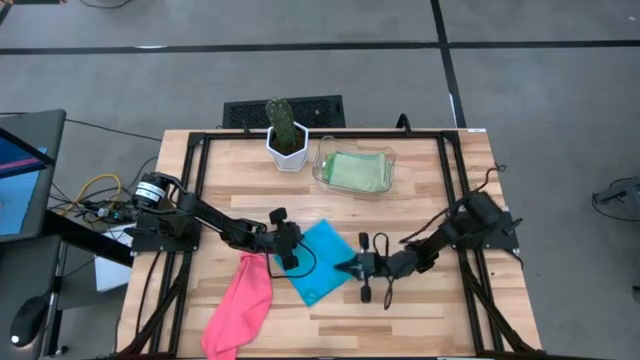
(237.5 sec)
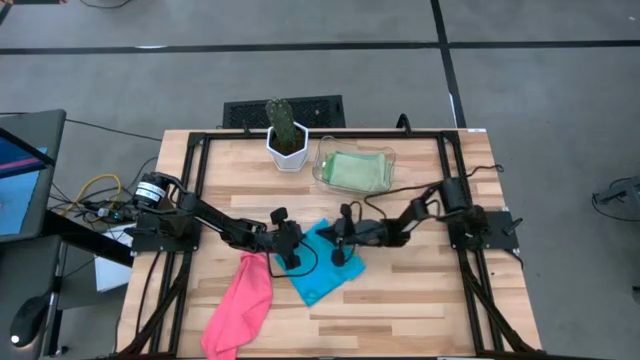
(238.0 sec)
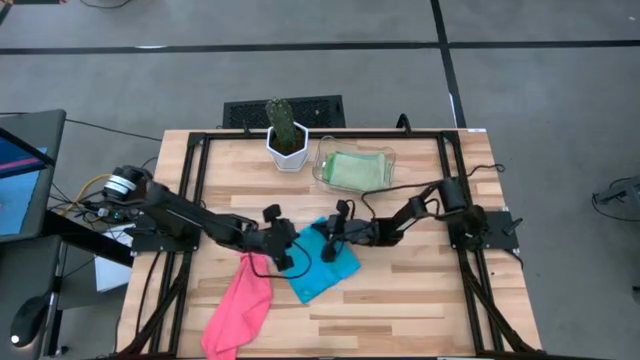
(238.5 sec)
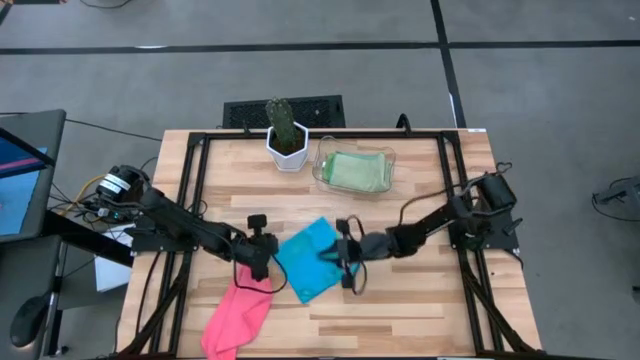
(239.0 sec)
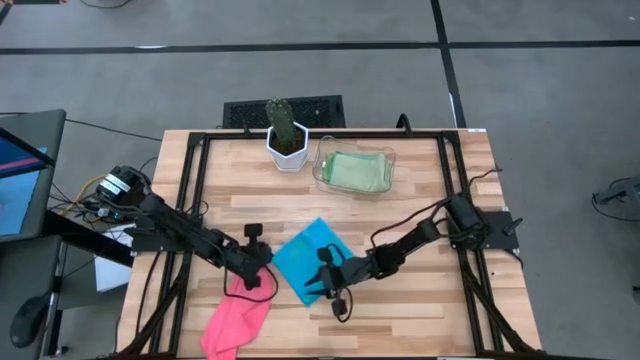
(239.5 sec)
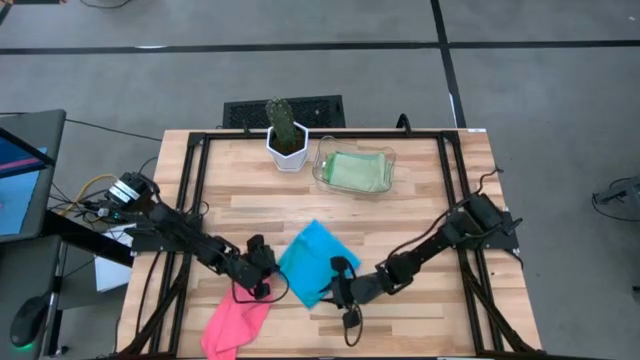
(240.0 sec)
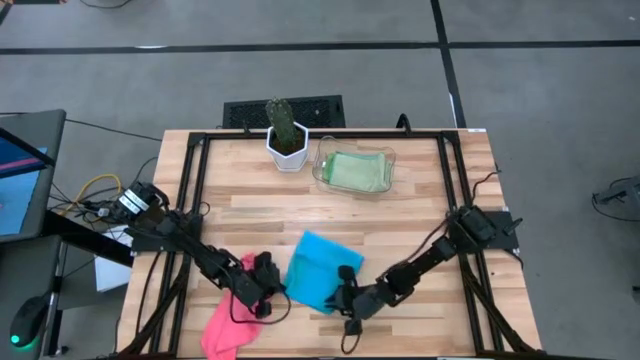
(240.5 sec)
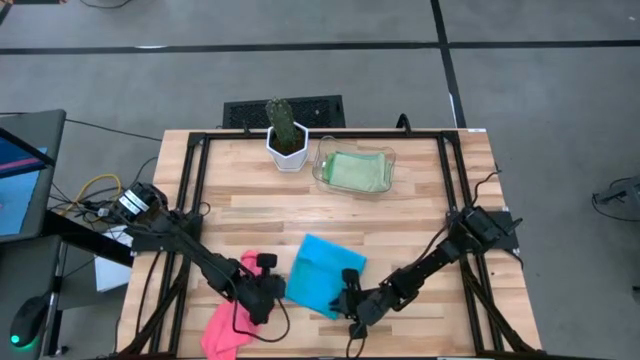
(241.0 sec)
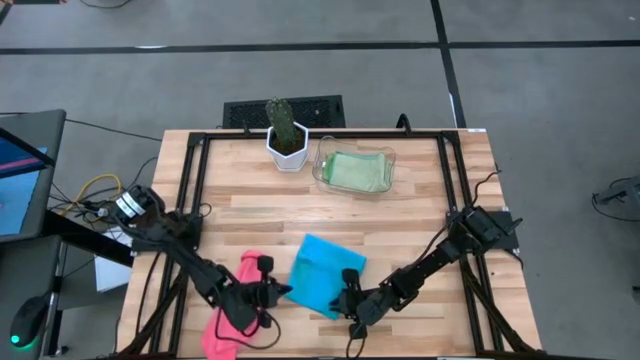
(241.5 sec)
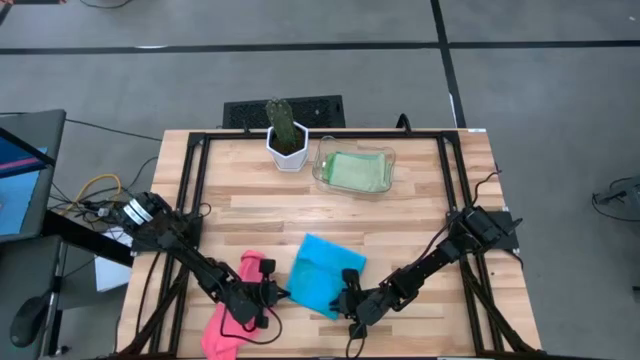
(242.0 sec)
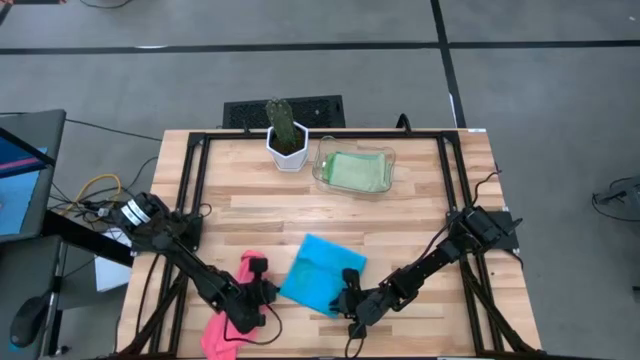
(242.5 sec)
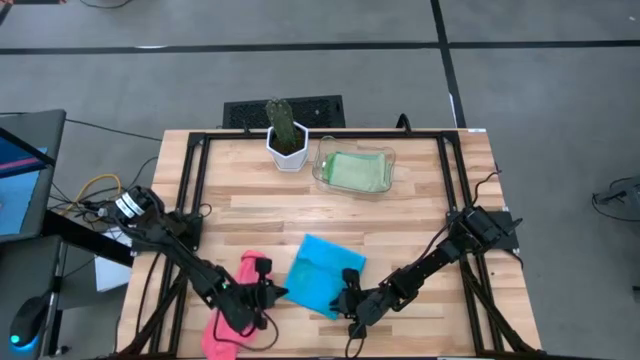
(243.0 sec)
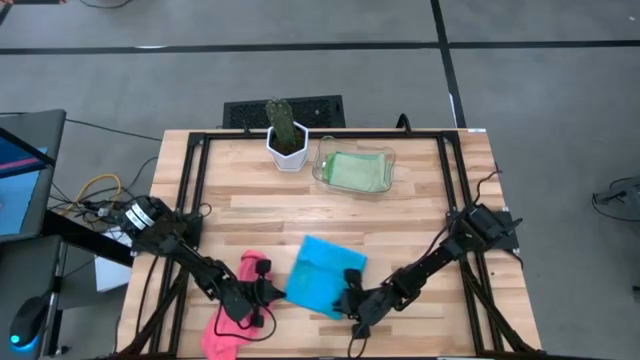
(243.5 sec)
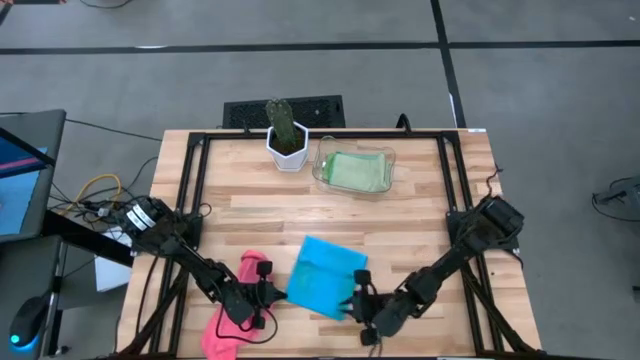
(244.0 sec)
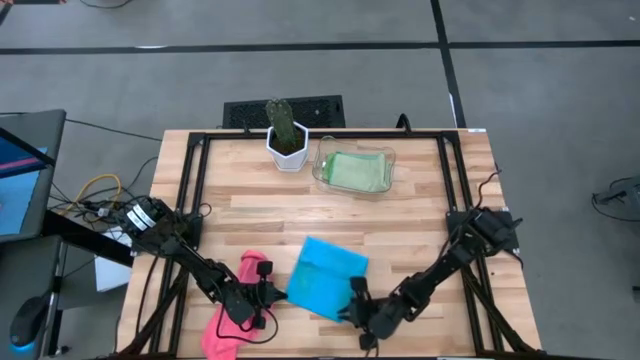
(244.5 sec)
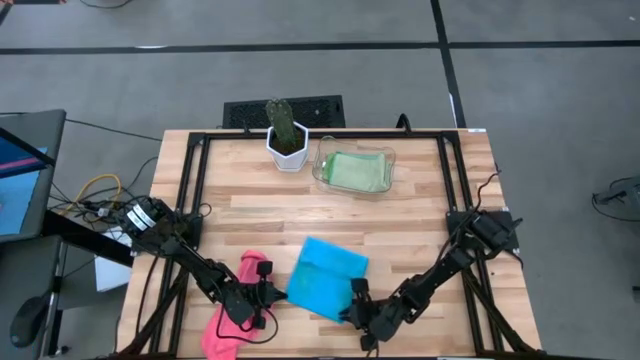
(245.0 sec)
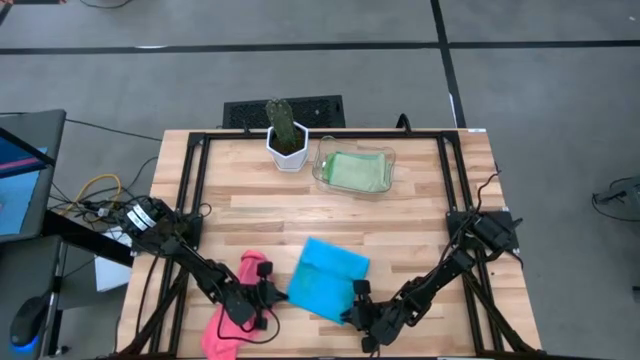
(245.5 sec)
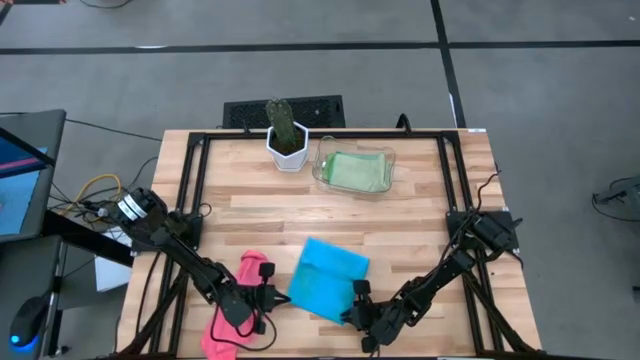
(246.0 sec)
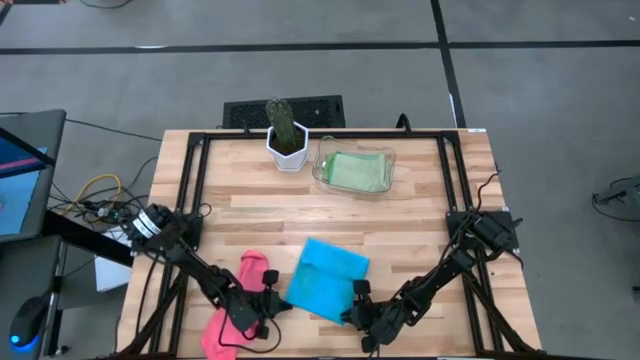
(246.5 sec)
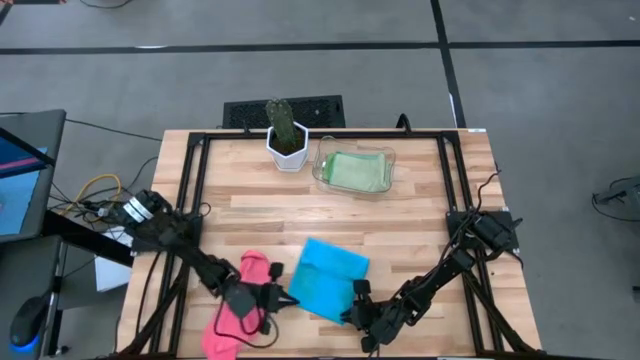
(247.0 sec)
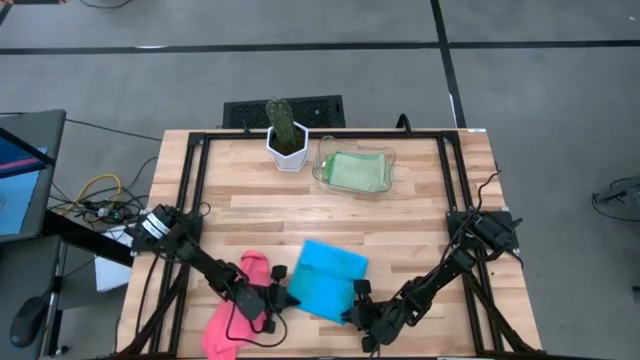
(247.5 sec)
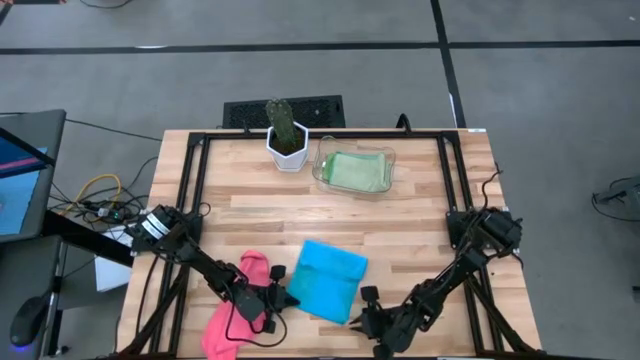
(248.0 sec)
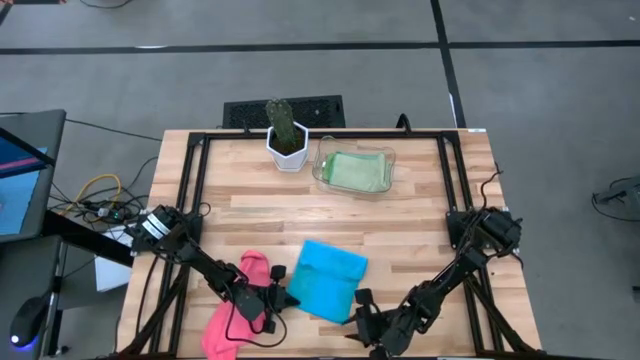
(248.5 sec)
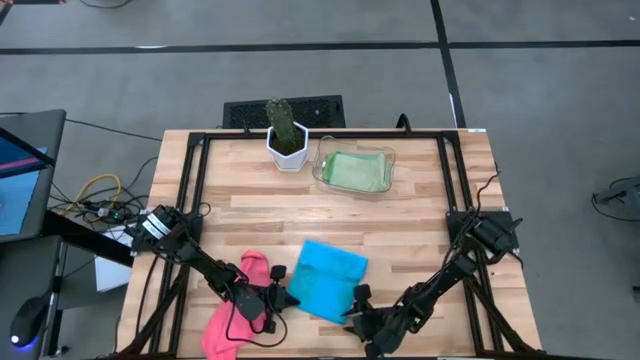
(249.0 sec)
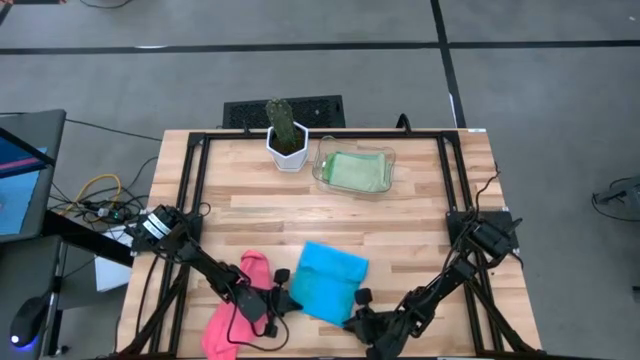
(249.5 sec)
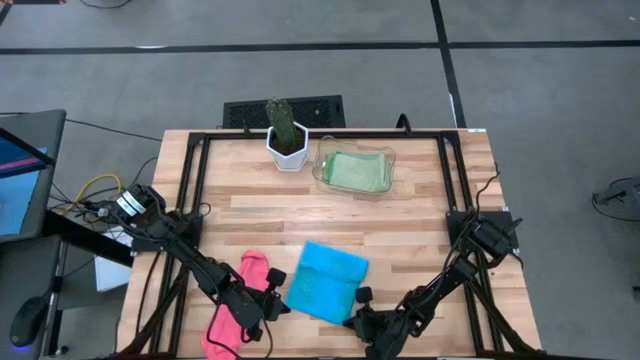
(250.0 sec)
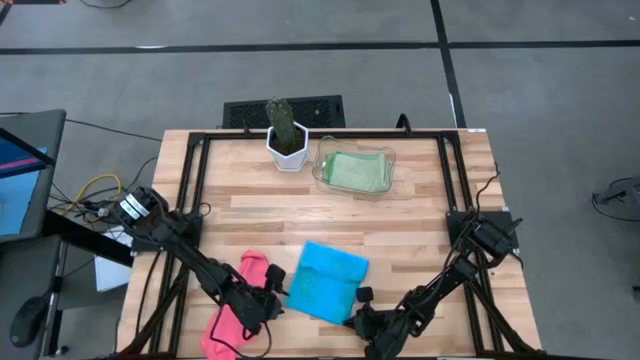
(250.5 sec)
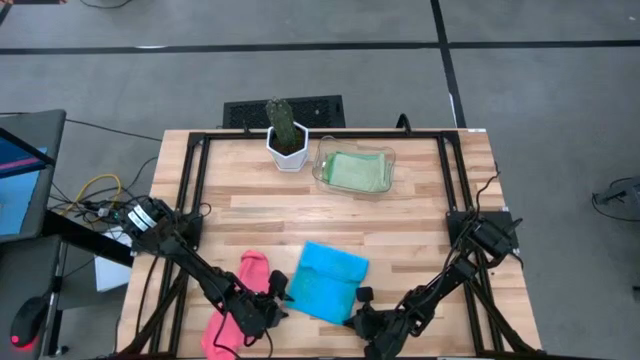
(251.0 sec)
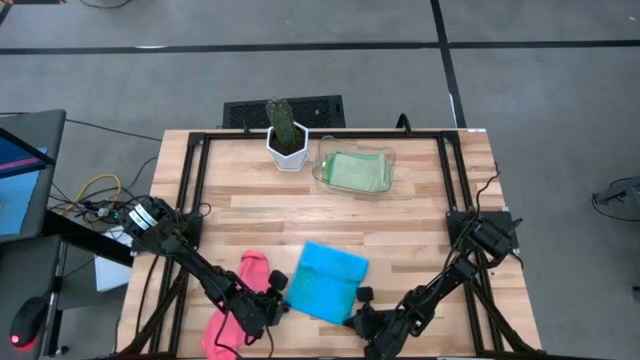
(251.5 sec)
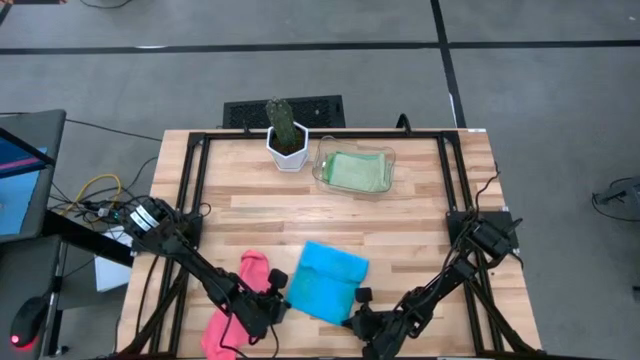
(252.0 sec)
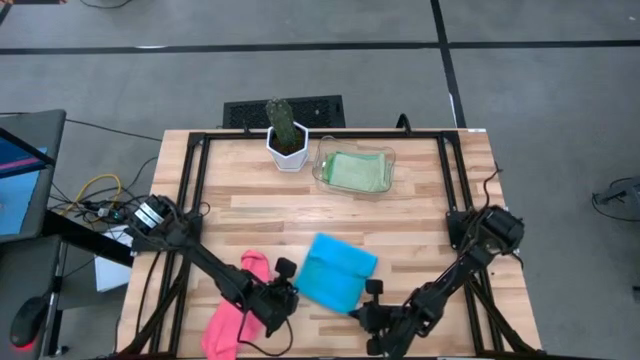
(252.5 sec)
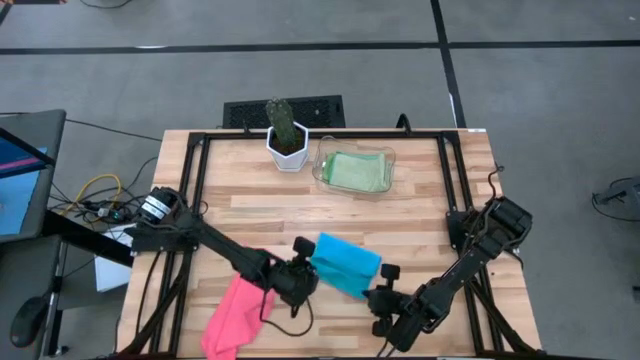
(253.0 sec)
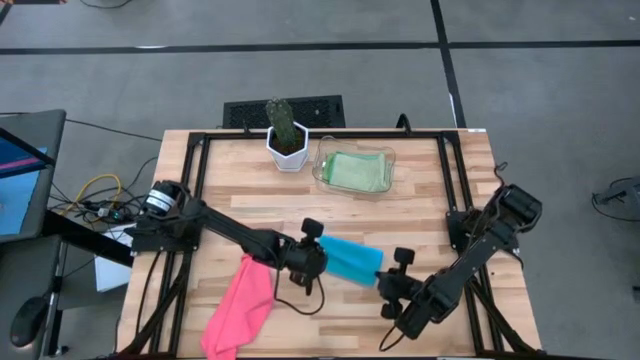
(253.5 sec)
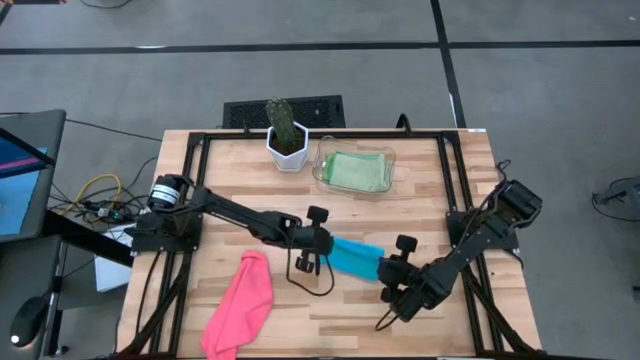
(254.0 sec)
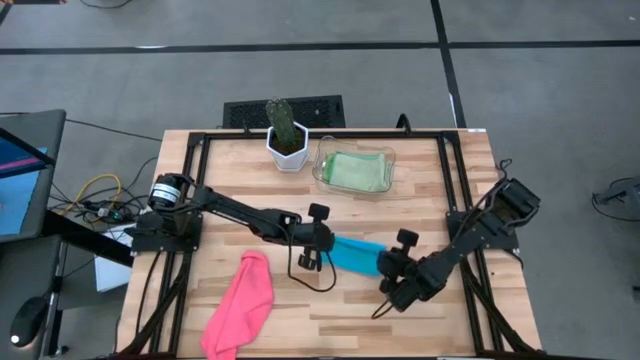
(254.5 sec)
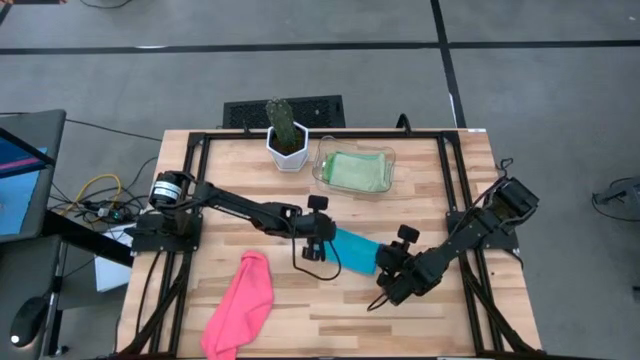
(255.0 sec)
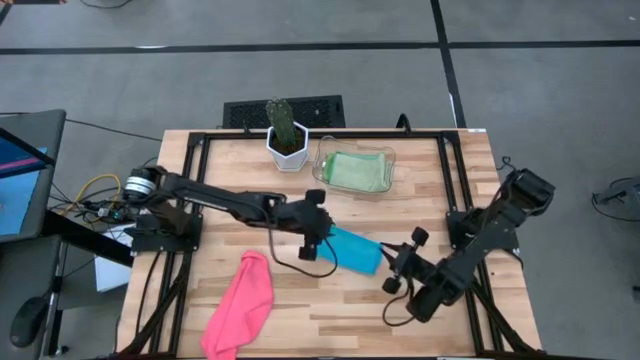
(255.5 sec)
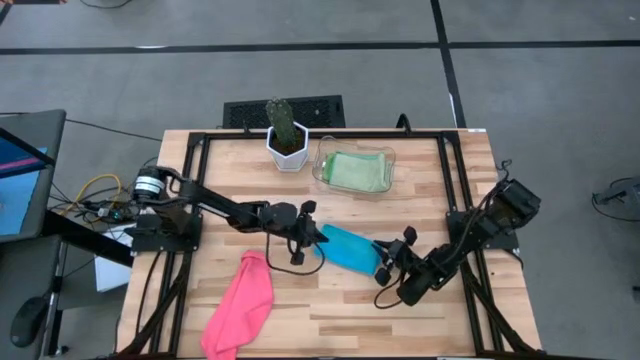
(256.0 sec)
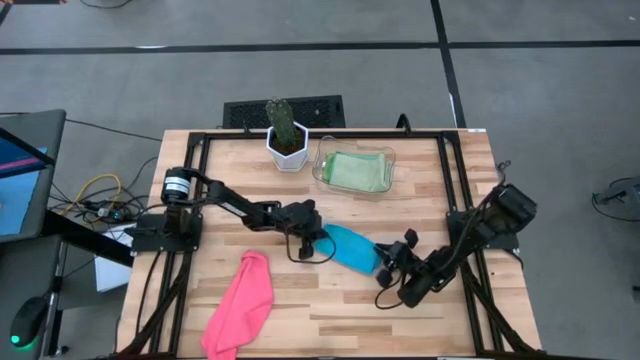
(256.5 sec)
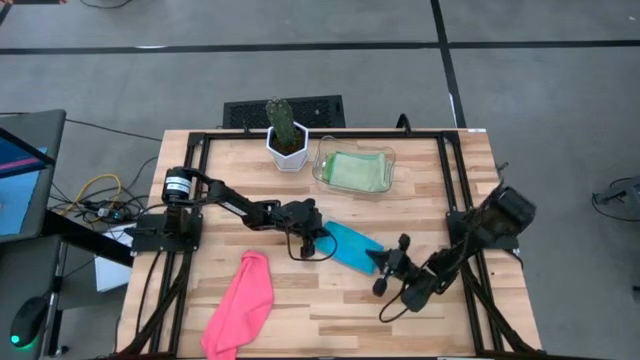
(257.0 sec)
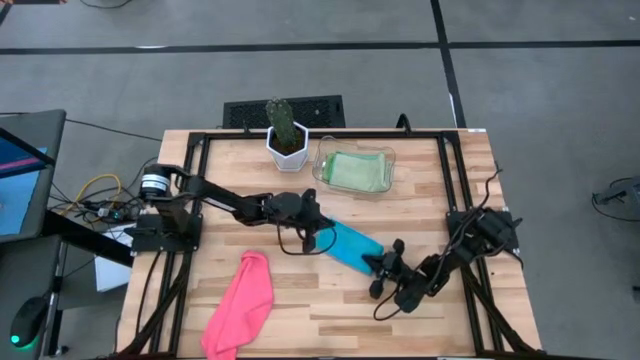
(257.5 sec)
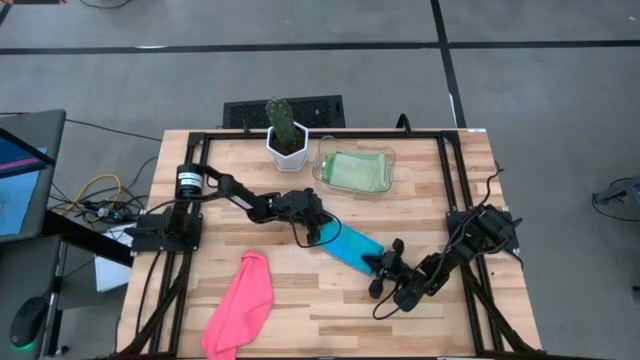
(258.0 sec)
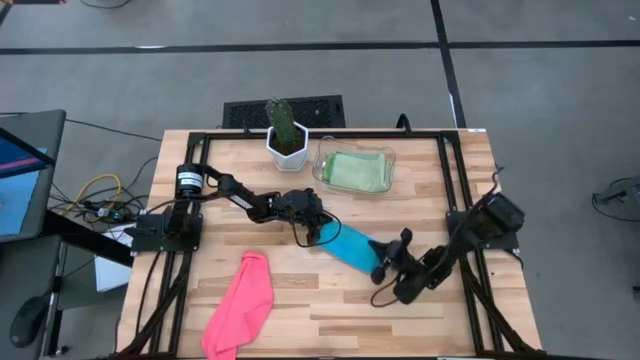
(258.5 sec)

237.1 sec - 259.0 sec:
Task: Fold microfiber towels
Fold the blue towel on the table
